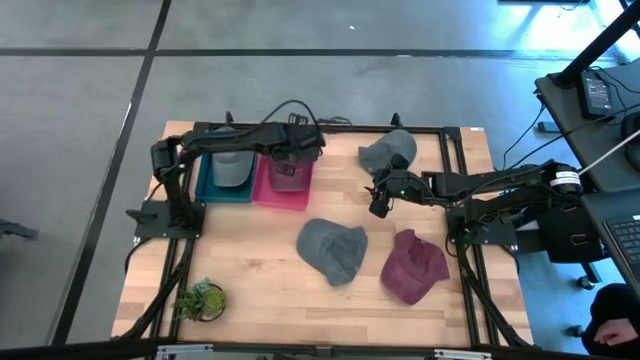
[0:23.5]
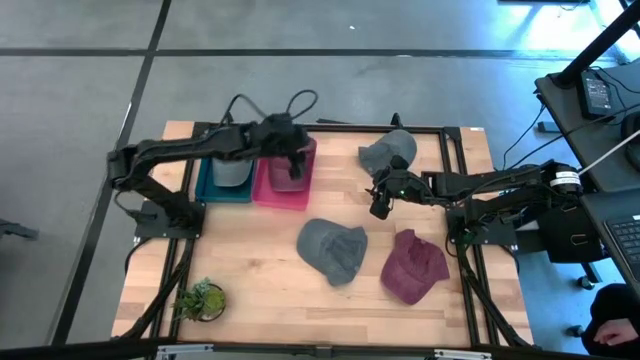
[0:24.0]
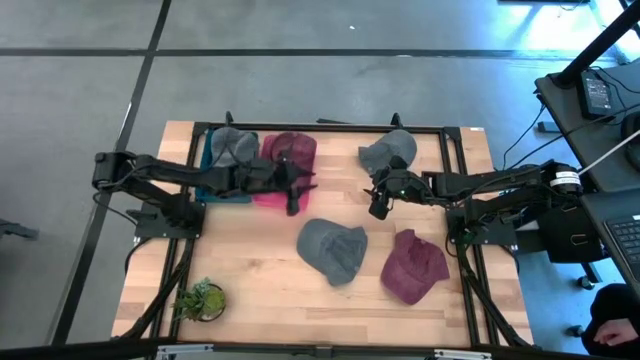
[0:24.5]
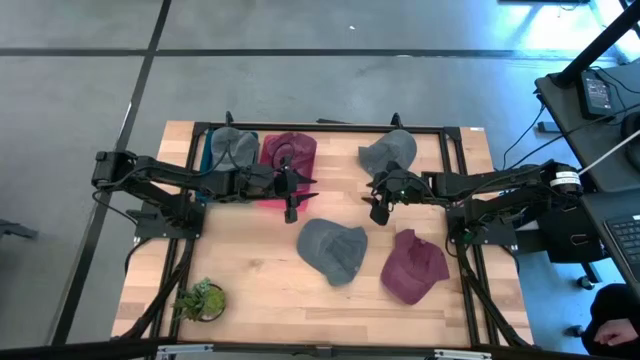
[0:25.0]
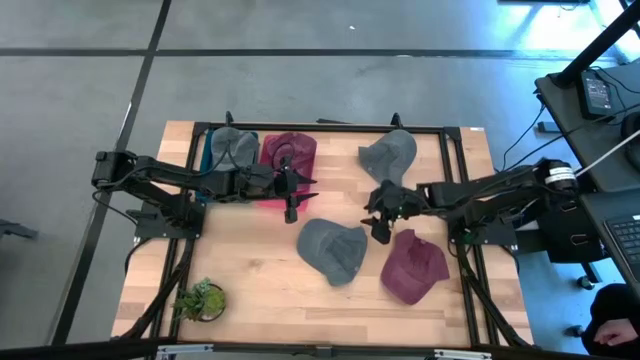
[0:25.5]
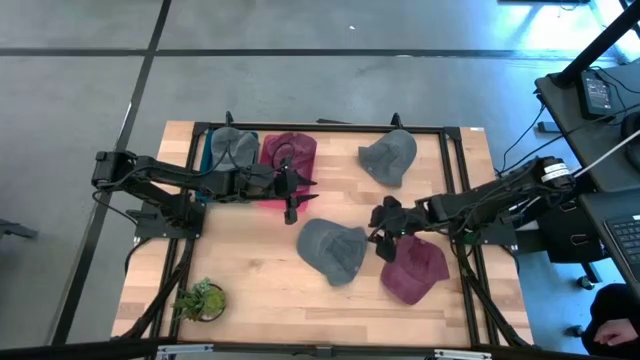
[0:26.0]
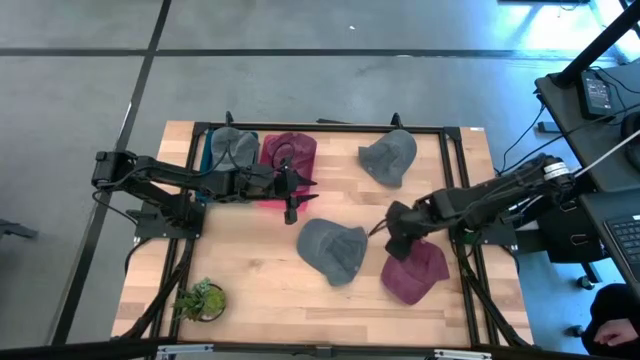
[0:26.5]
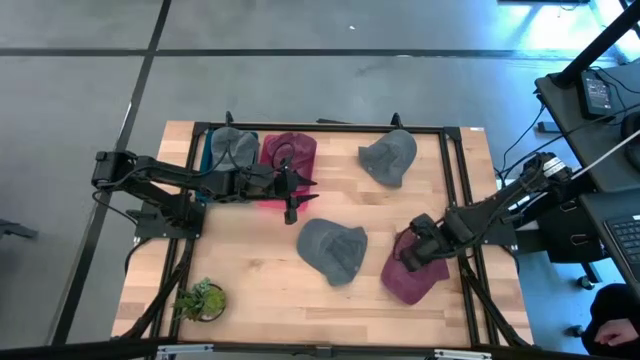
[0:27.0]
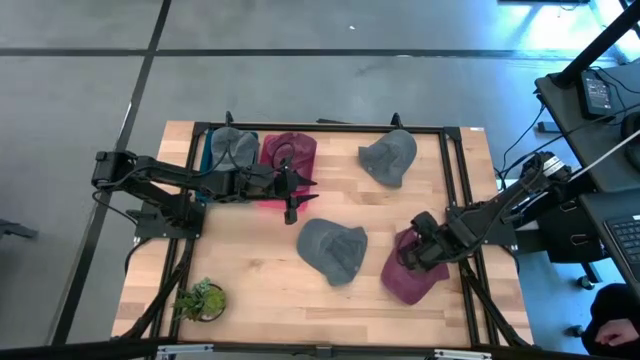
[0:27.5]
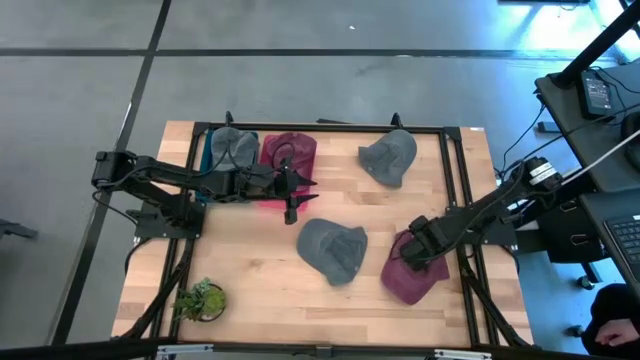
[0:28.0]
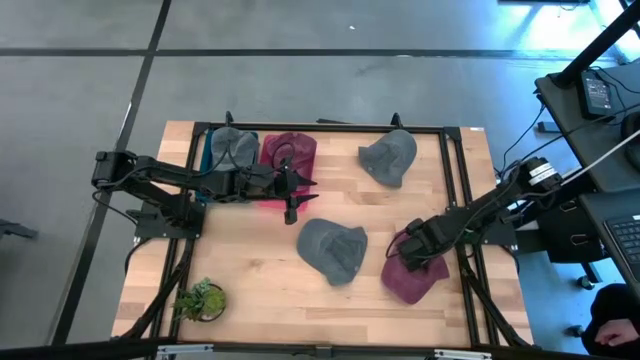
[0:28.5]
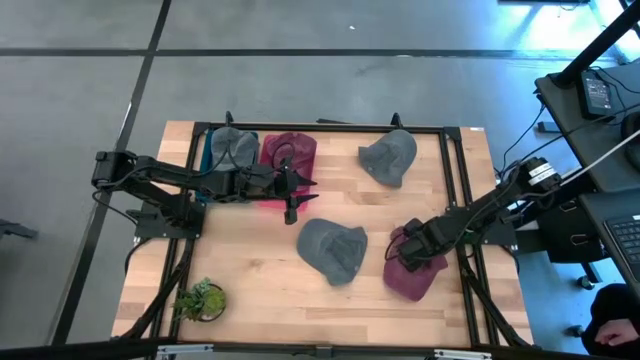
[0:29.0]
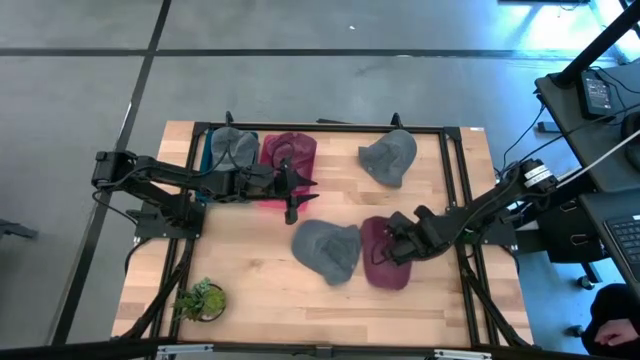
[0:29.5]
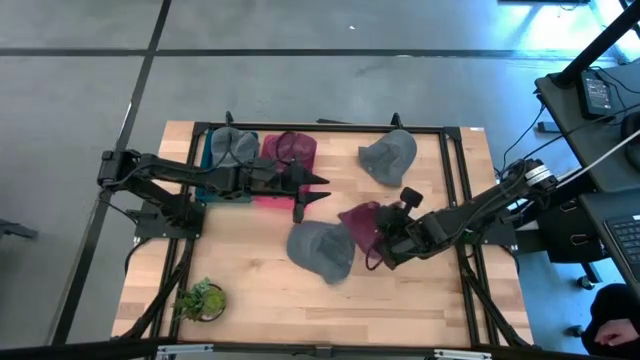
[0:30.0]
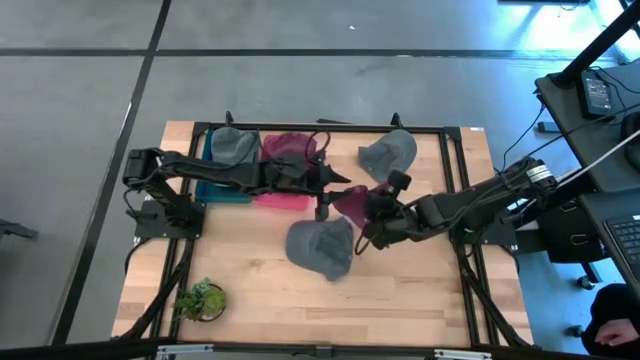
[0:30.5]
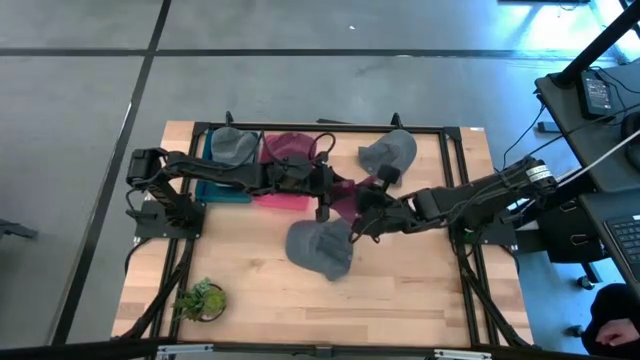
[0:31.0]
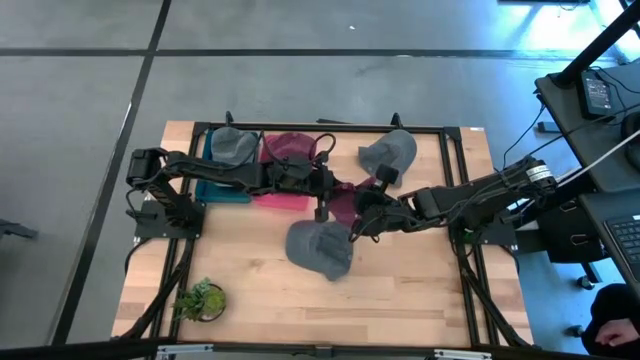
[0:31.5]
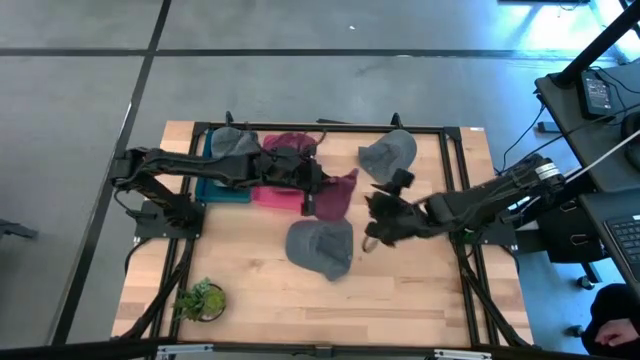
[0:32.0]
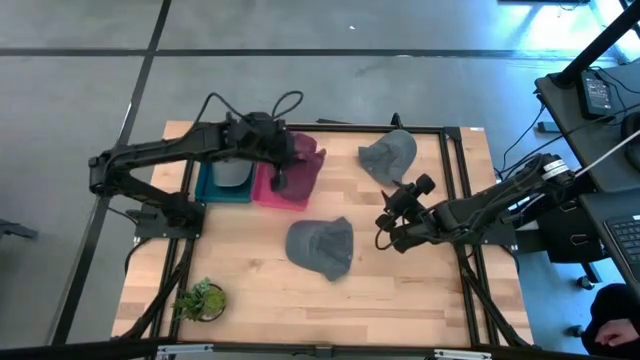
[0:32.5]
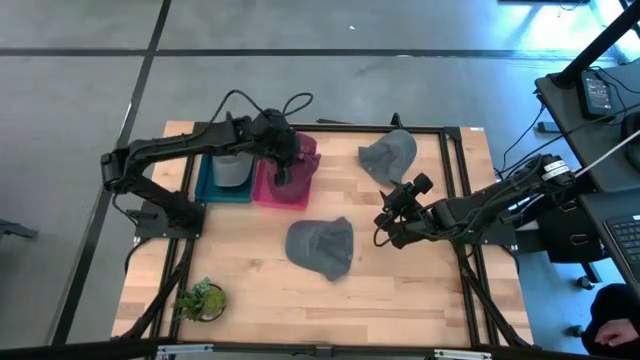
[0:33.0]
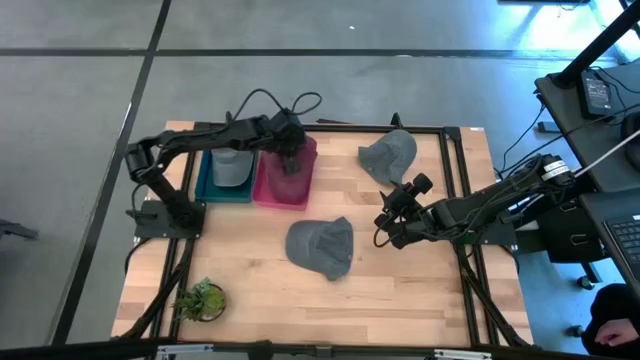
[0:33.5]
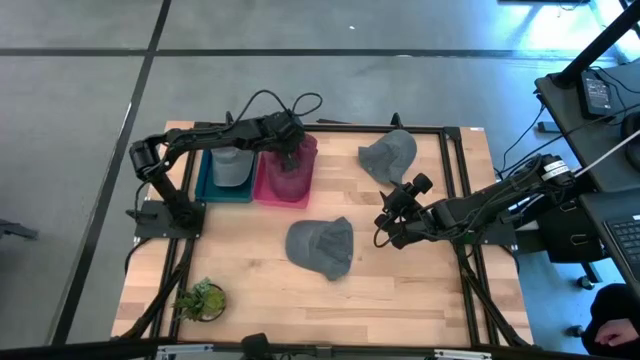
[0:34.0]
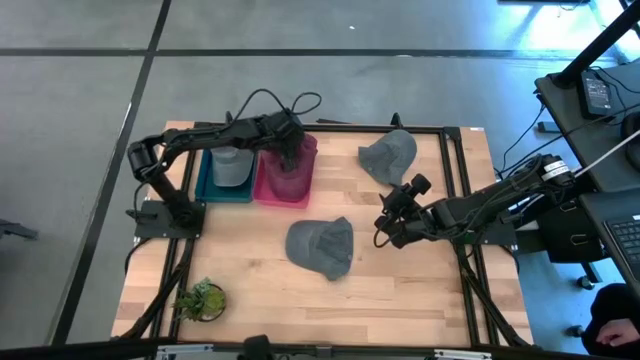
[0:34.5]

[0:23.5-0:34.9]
Task: Pick & Place hat
Put the red cap into the pink bin

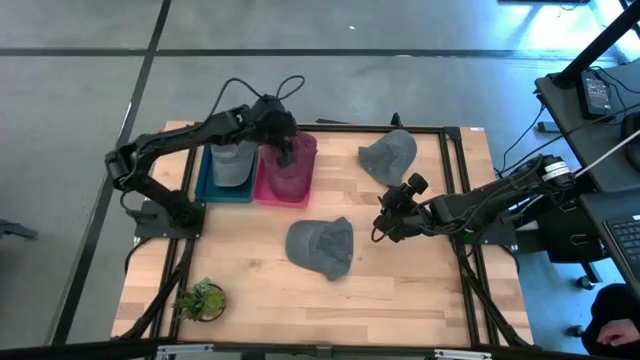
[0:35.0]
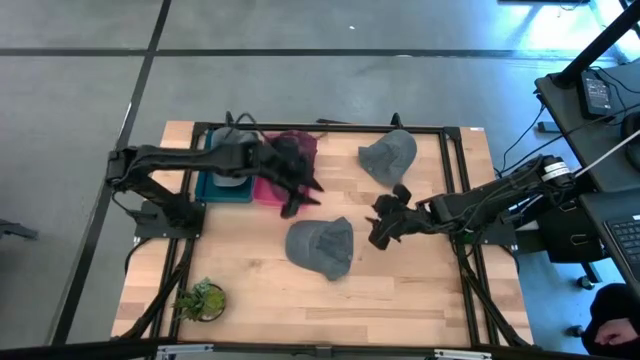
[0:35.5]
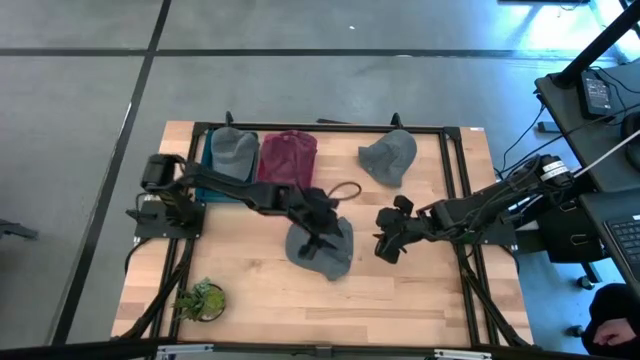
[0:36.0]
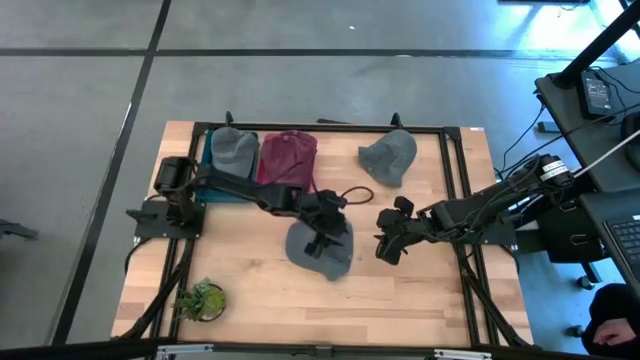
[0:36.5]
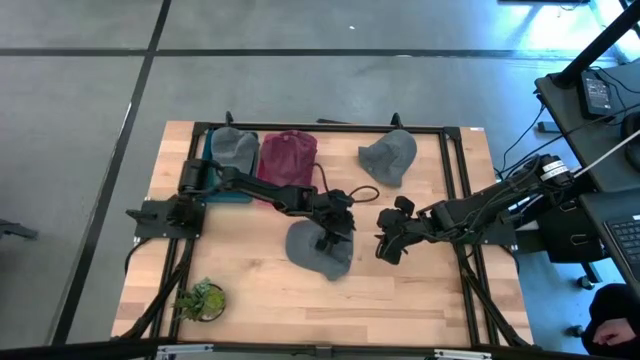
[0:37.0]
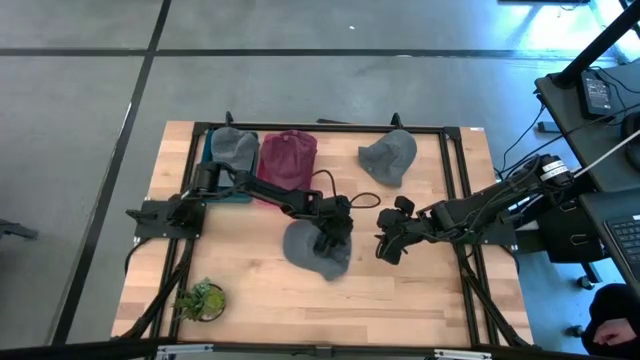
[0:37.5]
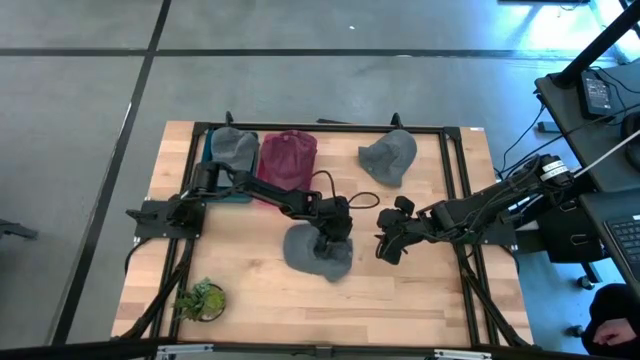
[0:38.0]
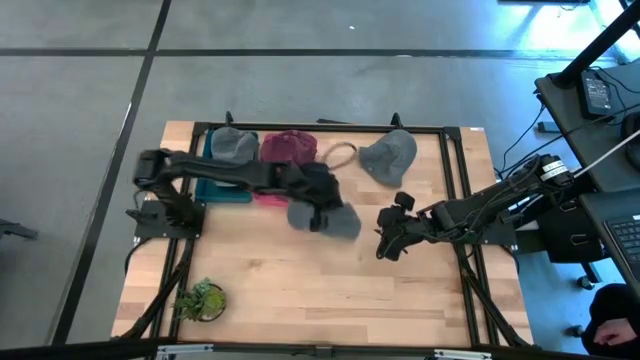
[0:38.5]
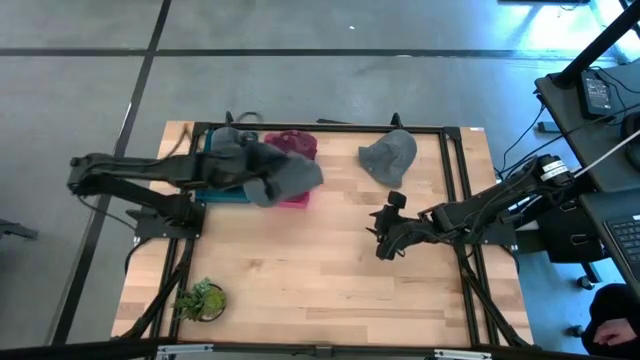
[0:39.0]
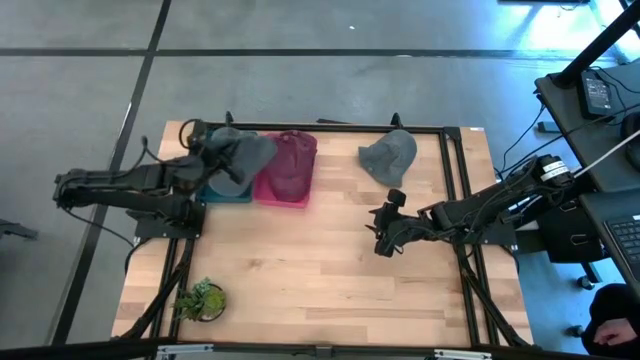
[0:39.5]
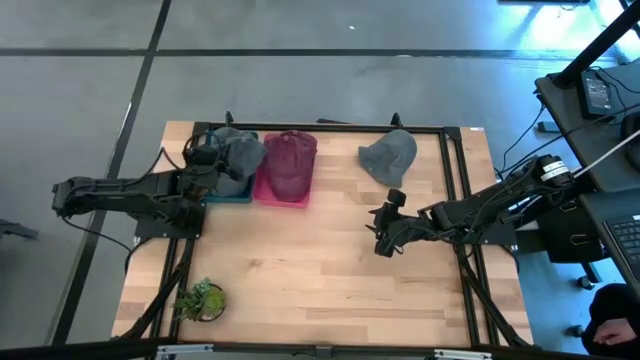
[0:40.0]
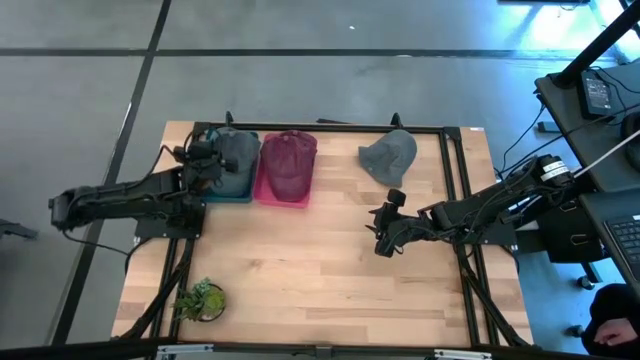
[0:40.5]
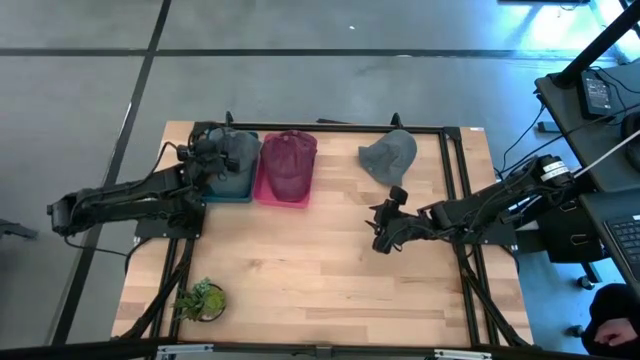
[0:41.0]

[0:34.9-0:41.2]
Put the bottom blue cap into the blue bin

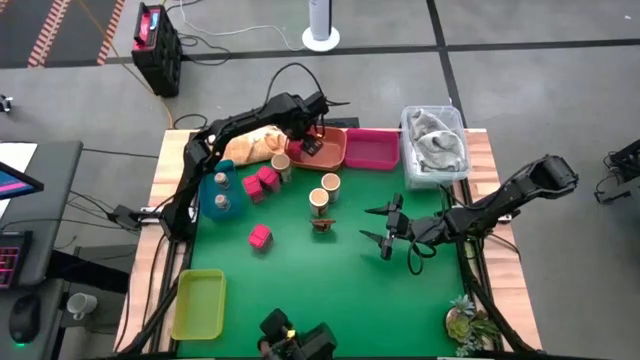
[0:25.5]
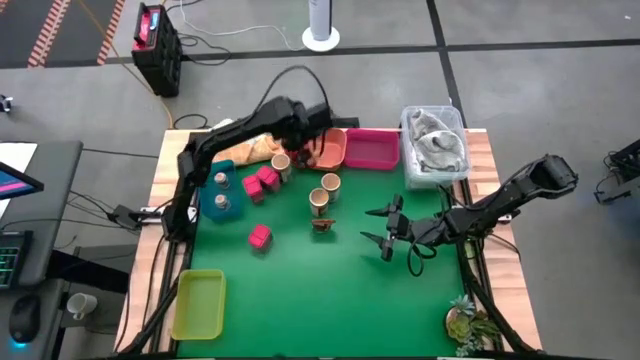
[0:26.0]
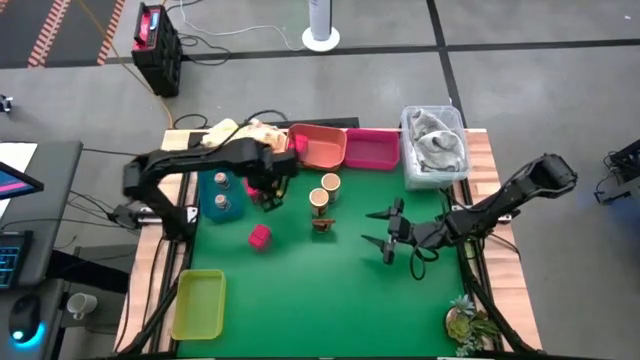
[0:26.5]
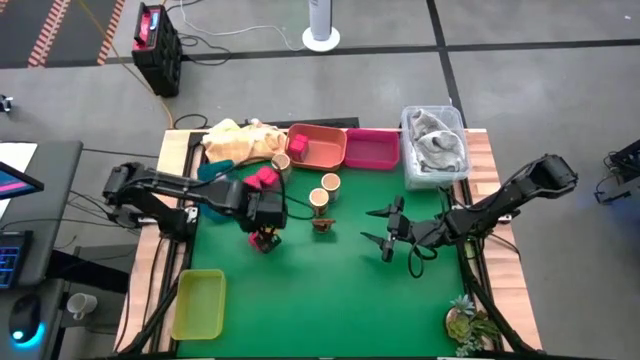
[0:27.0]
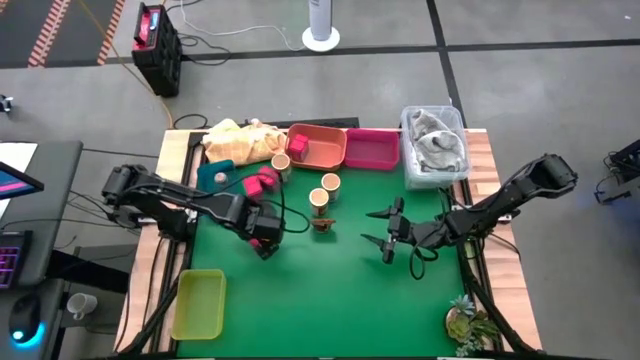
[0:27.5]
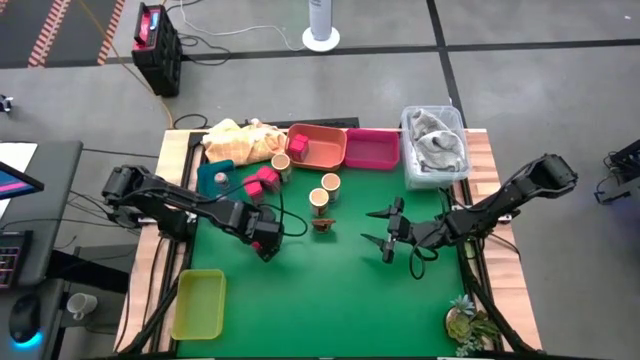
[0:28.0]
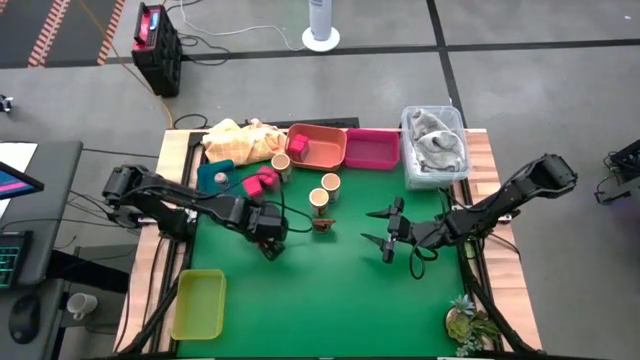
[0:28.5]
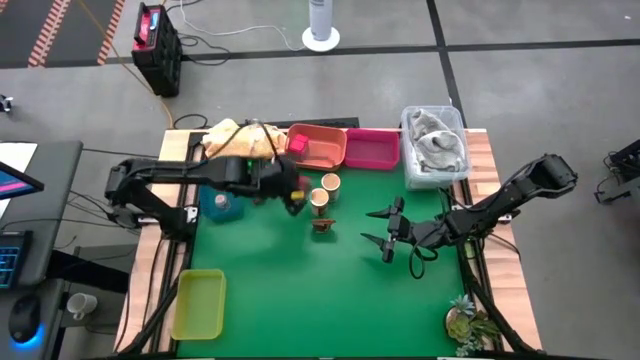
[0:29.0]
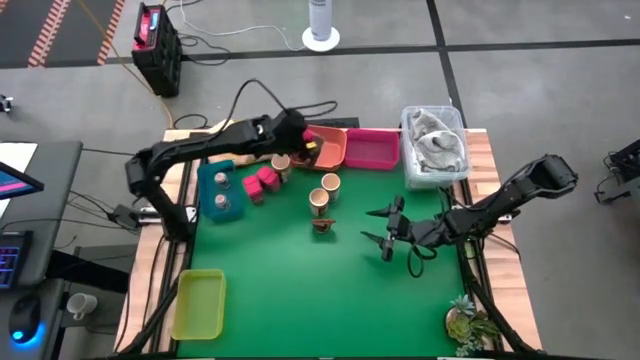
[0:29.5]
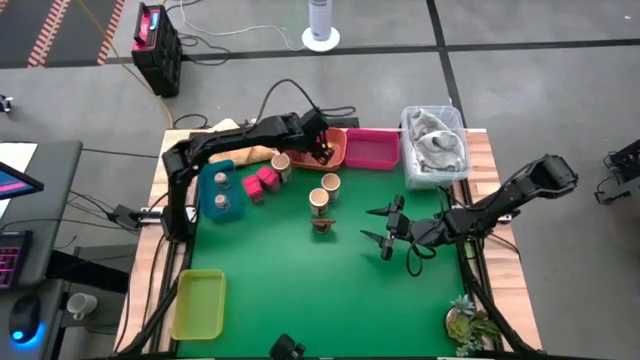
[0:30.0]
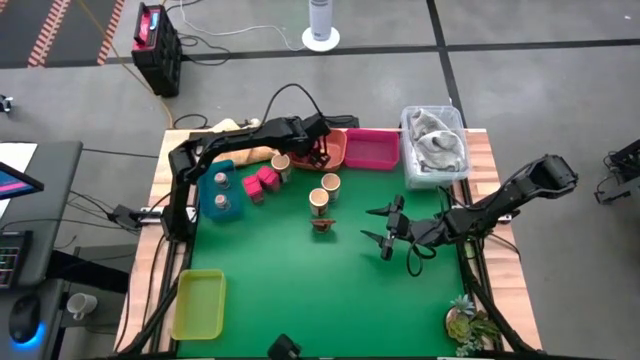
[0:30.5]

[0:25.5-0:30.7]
Task: Sort spices by type
Put the bottom red seasoning can into the orange bin
